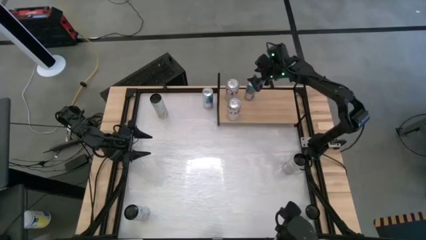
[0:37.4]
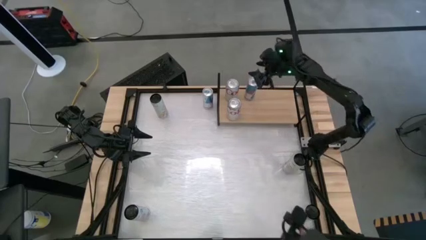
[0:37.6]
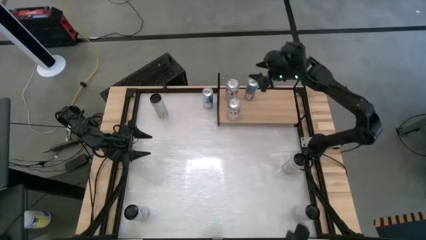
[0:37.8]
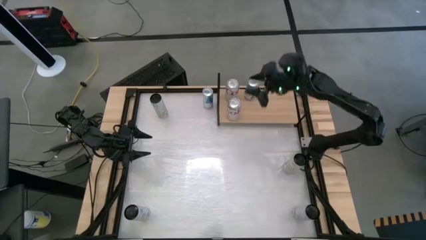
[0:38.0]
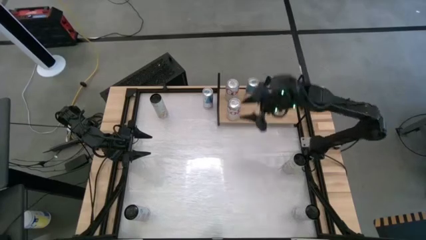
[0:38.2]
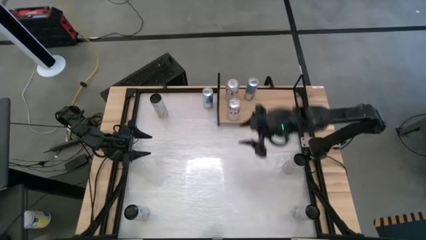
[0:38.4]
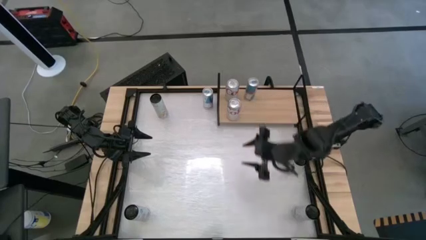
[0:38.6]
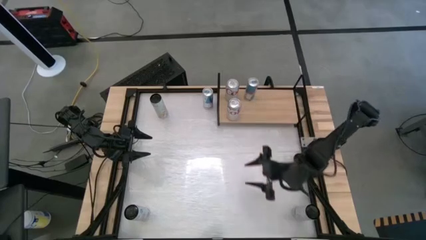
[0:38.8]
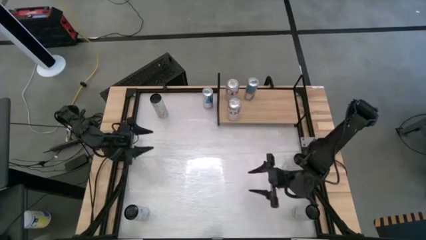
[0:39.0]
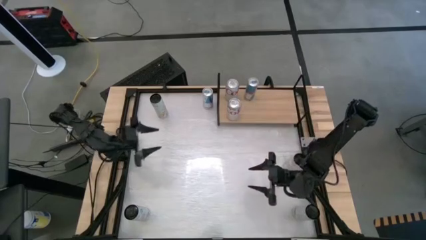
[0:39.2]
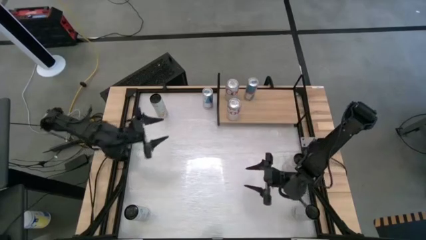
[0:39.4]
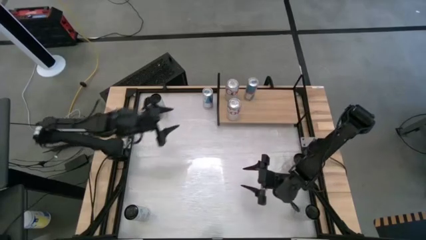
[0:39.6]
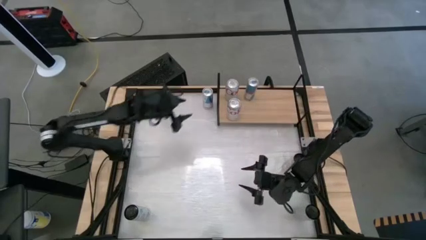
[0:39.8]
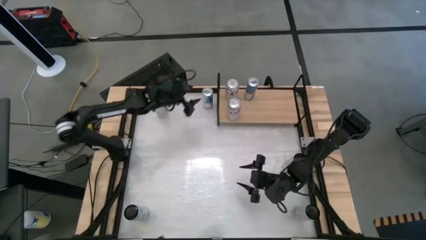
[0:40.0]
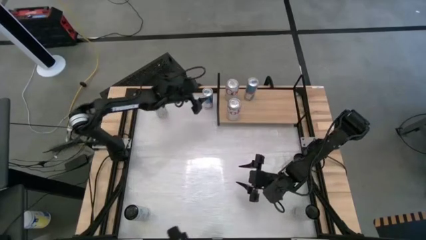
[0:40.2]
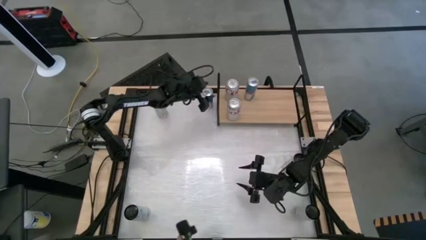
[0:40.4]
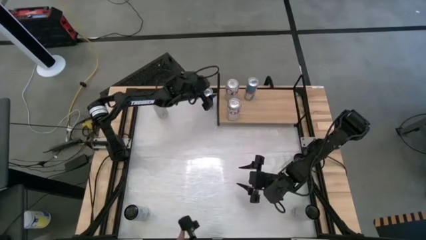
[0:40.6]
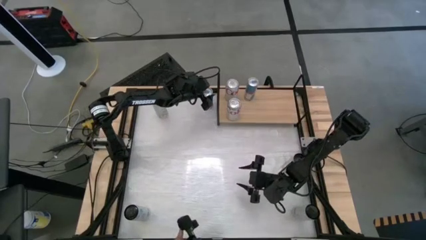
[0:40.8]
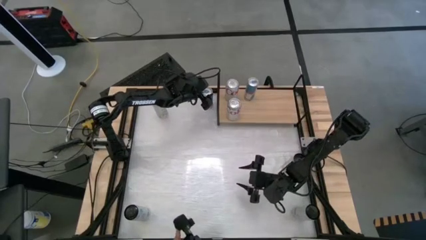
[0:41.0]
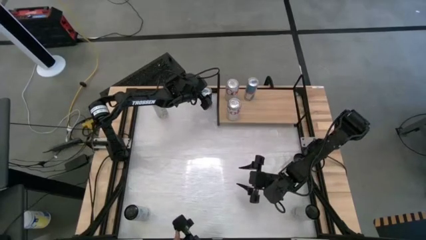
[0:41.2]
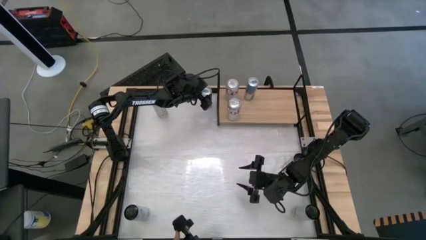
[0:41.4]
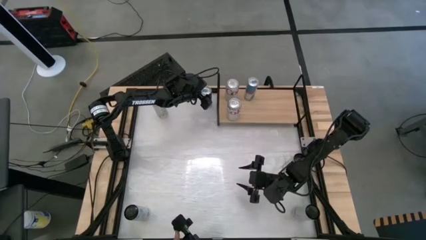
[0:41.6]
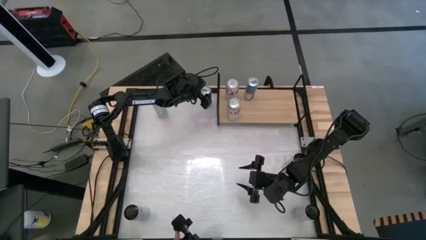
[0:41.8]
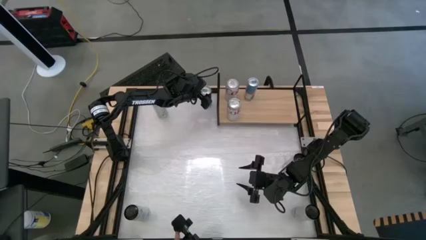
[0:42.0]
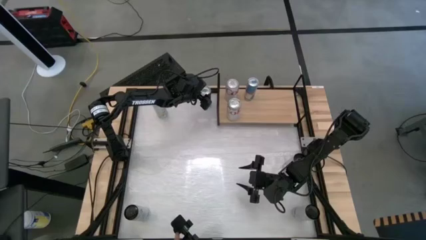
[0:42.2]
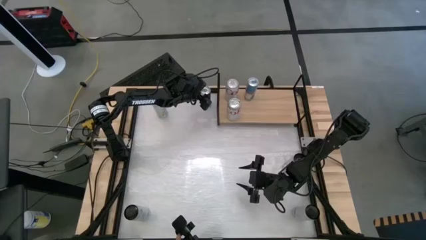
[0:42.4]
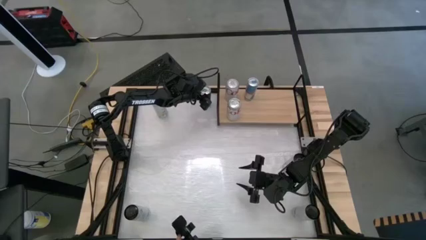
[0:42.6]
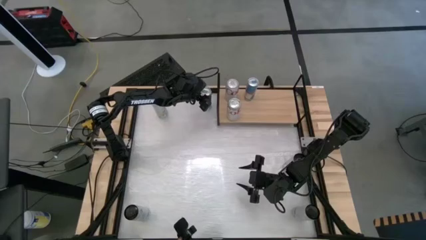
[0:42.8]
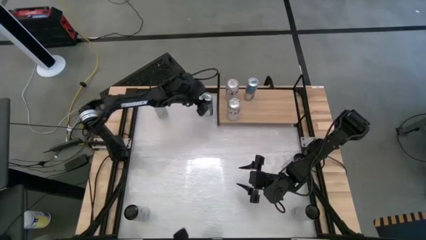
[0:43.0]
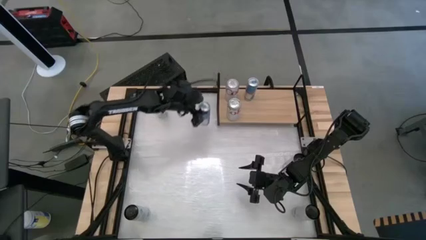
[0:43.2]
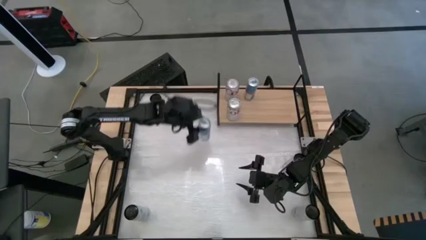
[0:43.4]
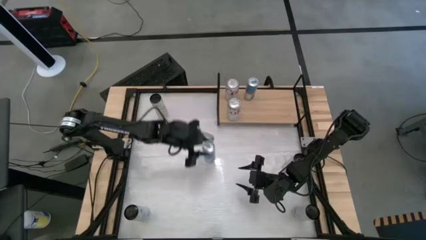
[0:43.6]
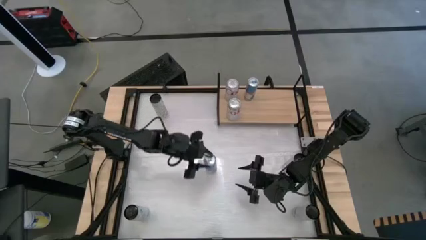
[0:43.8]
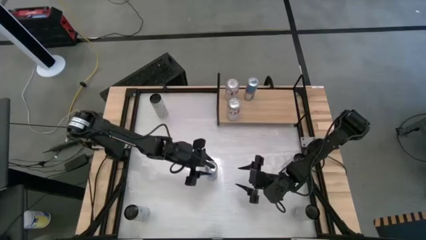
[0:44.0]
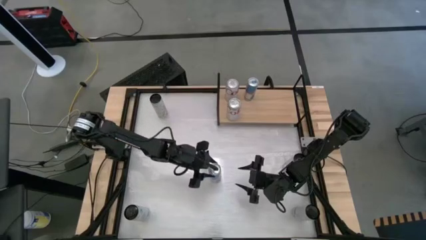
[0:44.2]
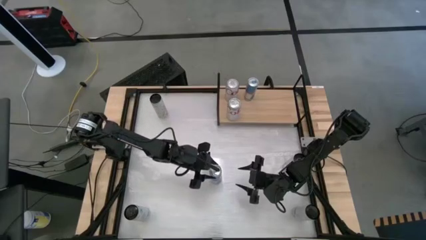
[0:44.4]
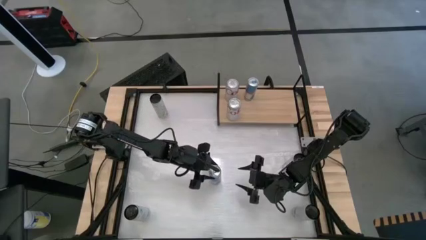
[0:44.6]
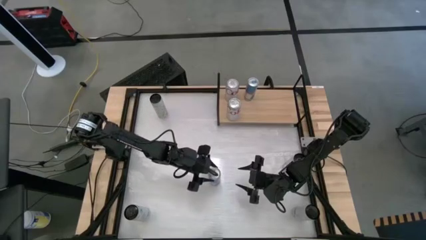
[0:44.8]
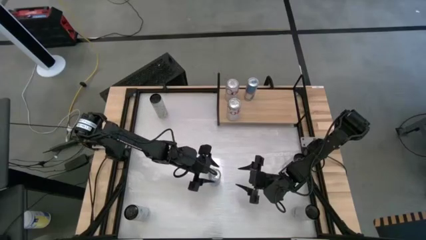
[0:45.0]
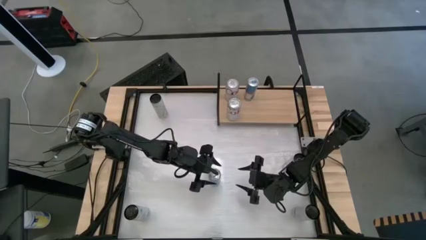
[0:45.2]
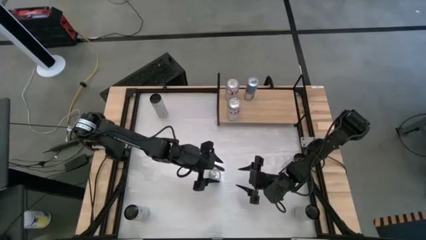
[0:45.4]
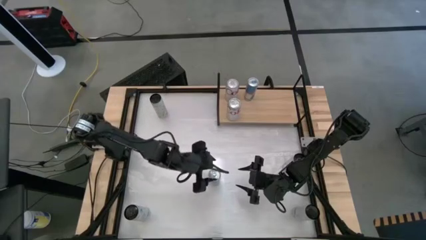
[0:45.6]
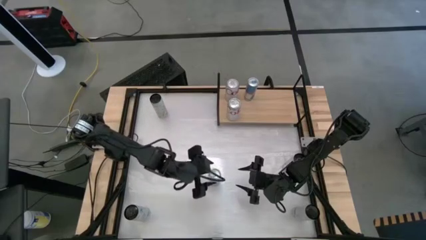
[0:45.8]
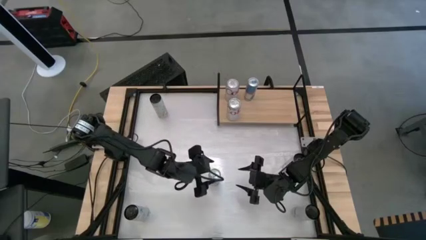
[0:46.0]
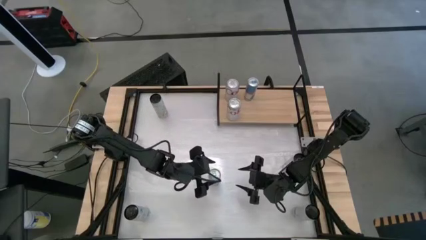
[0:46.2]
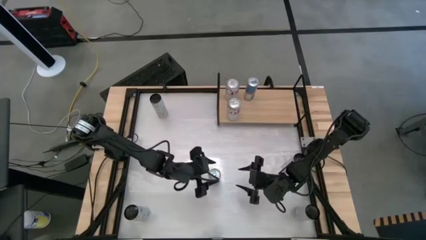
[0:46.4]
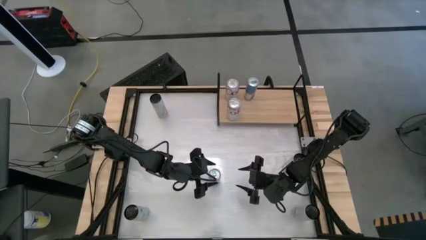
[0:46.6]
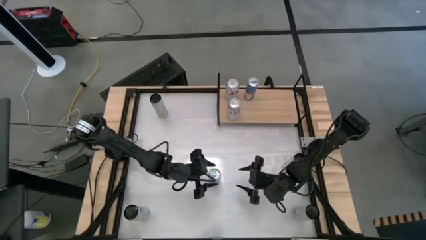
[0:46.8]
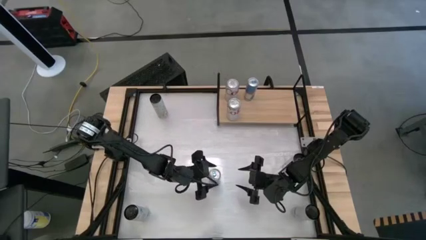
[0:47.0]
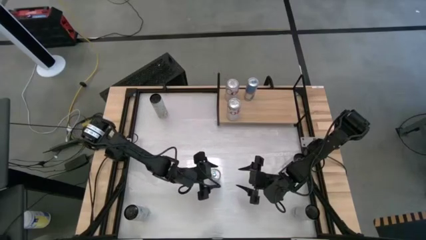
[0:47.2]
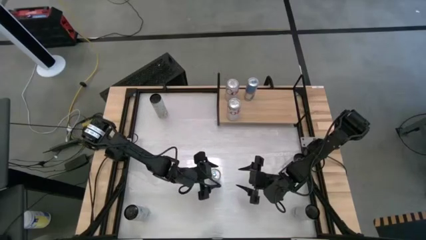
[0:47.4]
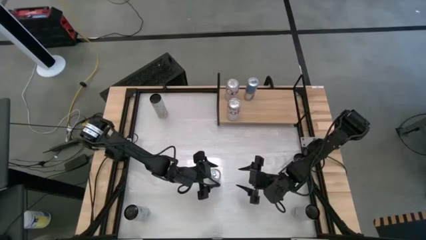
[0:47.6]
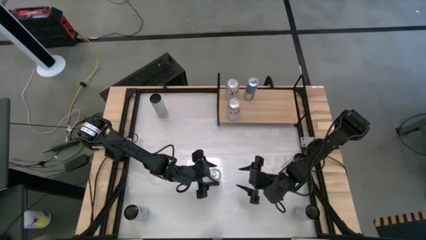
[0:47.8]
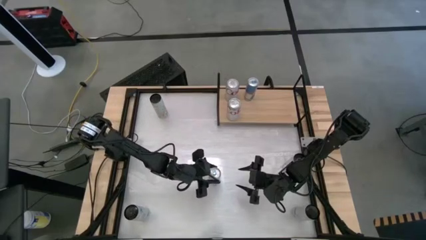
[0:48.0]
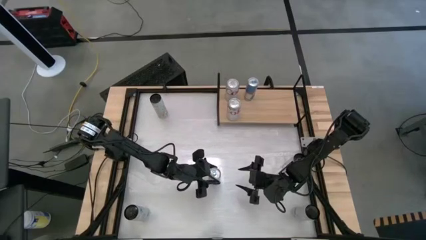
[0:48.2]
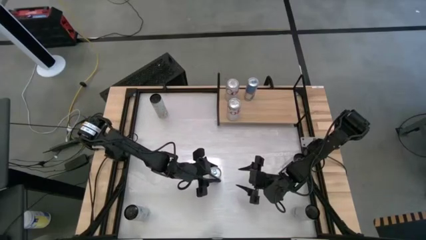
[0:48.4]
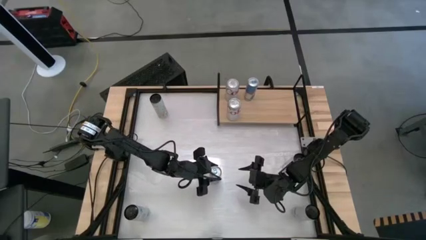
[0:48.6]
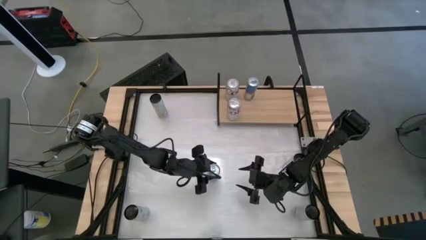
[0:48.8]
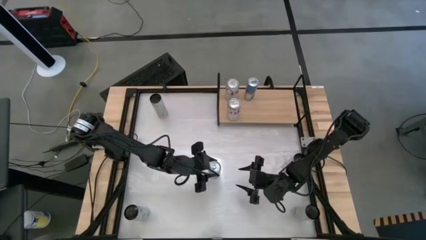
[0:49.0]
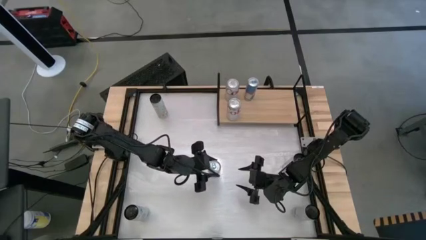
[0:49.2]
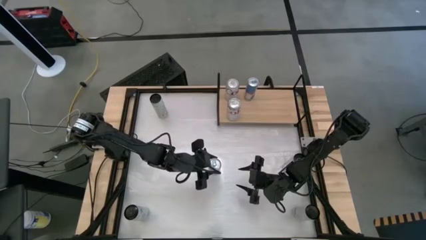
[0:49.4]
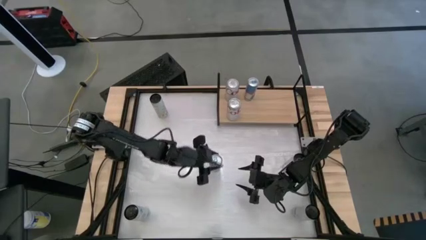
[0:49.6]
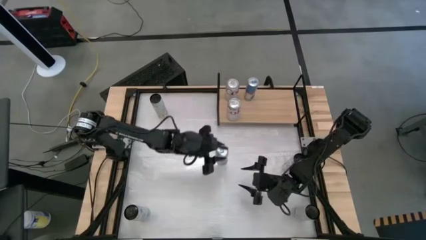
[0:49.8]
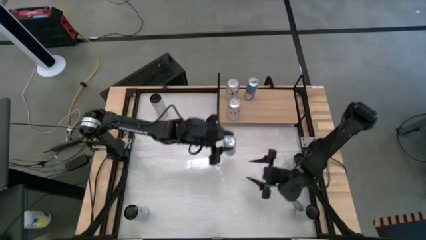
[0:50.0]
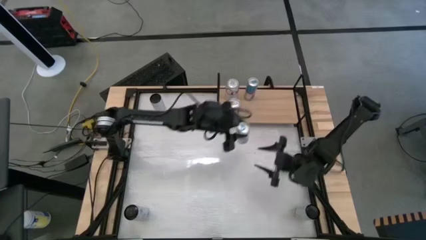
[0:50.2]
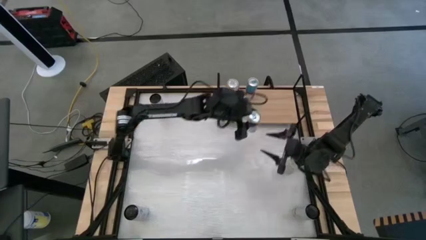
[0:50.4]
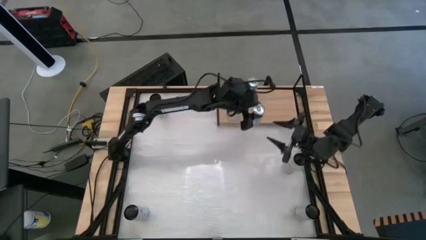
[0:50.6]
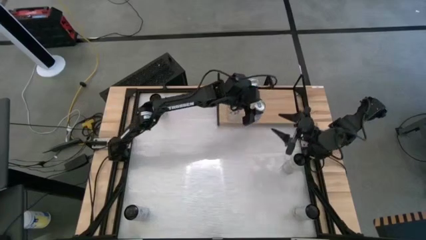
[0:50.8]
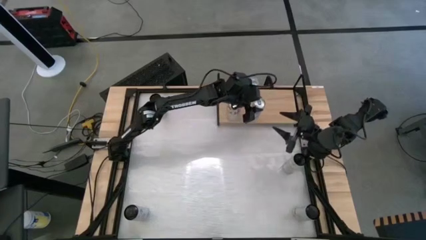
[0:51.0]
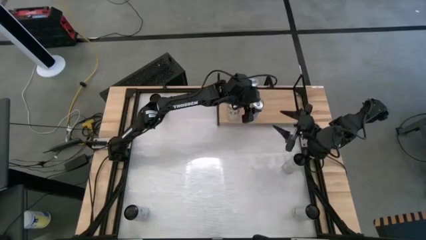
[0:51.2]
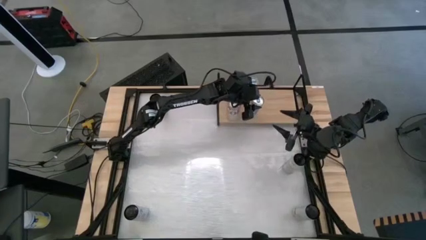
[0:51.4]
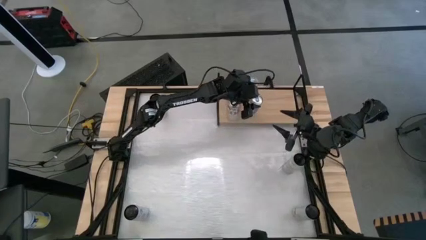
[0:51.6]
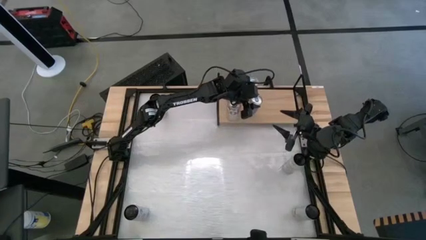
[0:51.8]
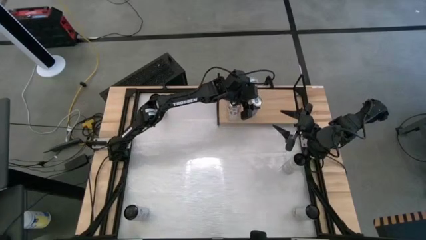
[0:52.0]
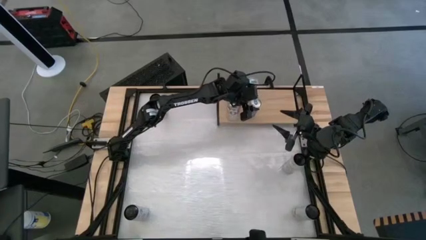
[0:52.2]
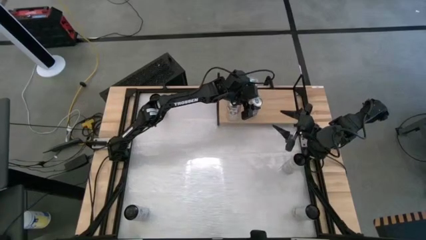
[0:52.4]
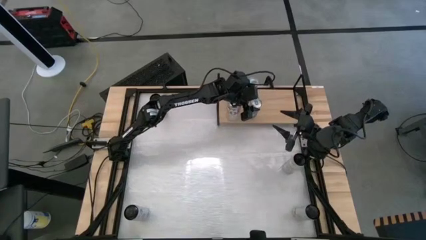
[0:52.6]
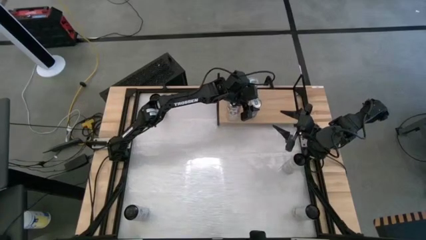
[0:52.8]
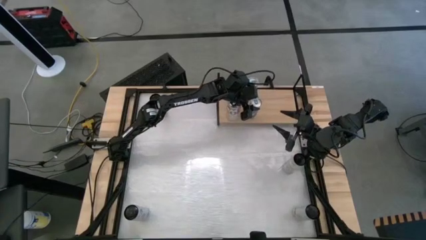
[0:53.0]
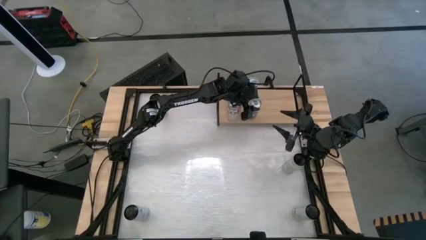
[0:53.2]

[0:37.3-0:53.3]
Task: Place canned beverage on shelf
Put the blue can on the shelf
